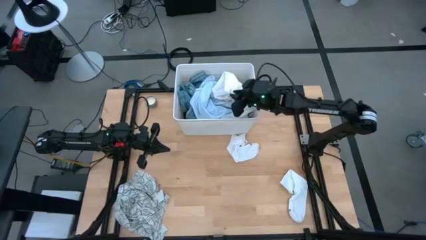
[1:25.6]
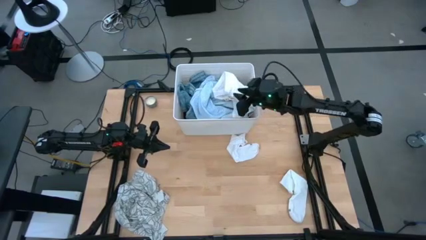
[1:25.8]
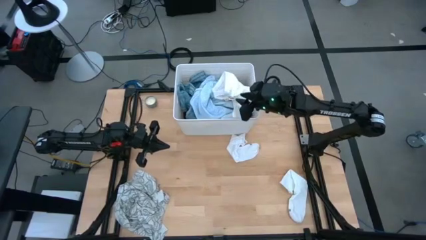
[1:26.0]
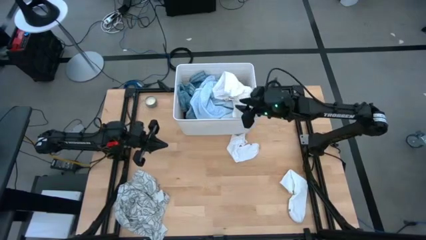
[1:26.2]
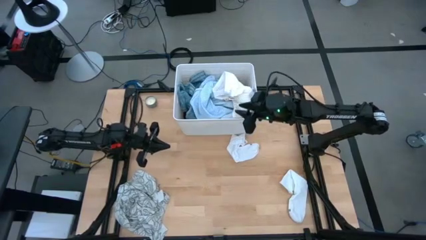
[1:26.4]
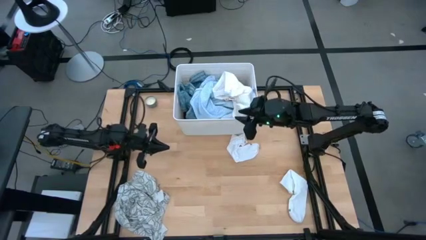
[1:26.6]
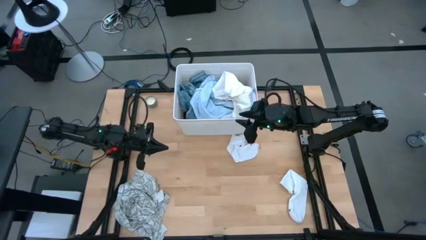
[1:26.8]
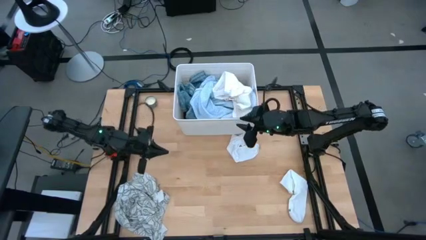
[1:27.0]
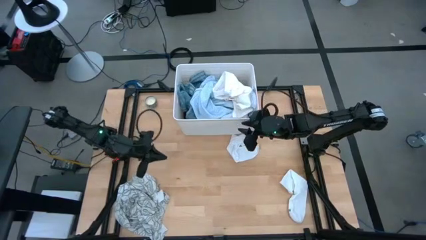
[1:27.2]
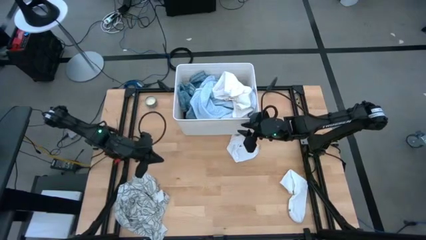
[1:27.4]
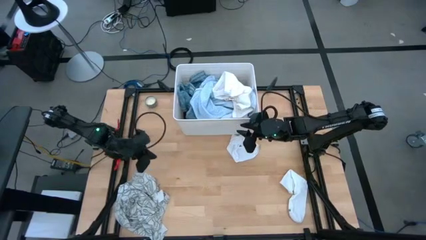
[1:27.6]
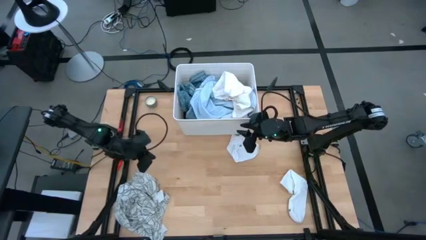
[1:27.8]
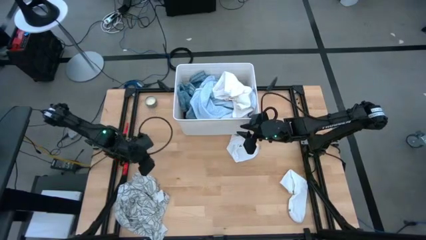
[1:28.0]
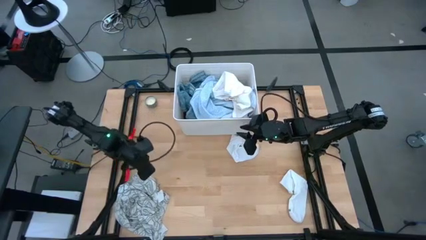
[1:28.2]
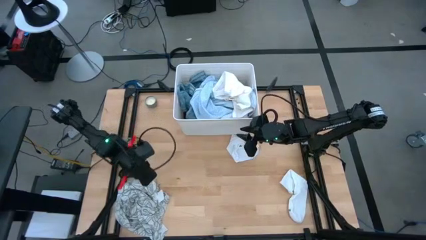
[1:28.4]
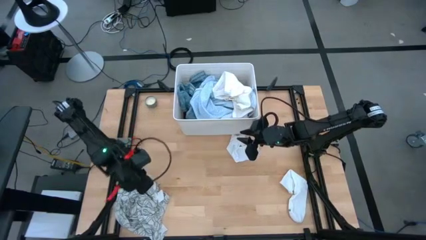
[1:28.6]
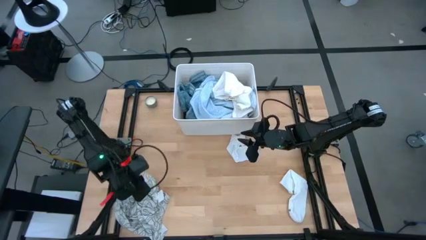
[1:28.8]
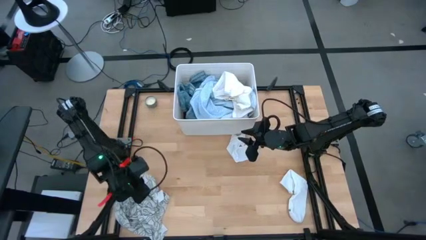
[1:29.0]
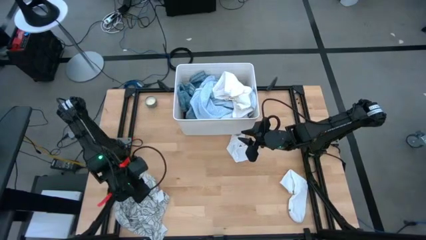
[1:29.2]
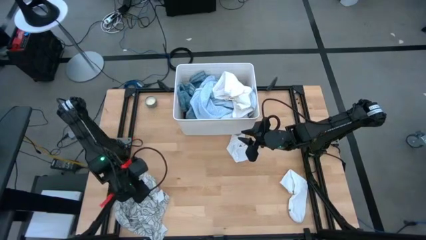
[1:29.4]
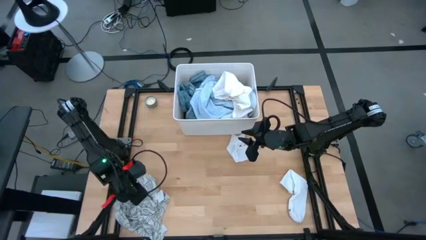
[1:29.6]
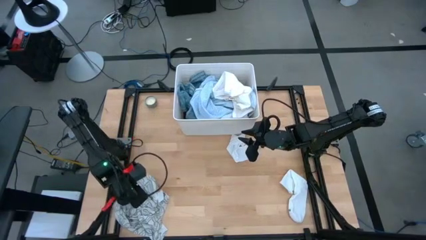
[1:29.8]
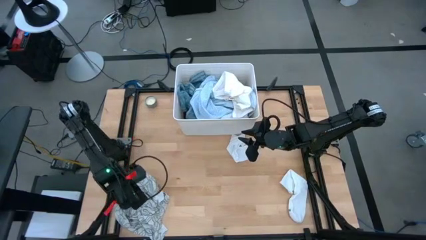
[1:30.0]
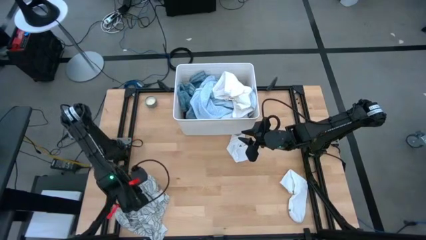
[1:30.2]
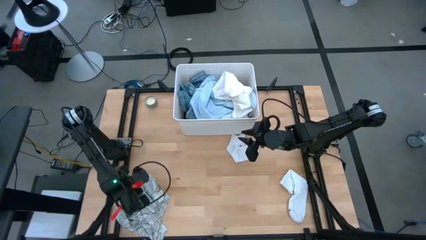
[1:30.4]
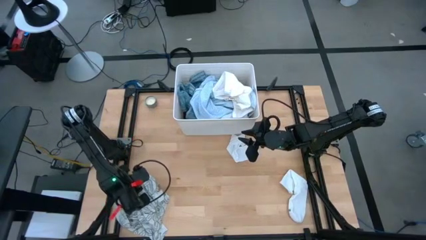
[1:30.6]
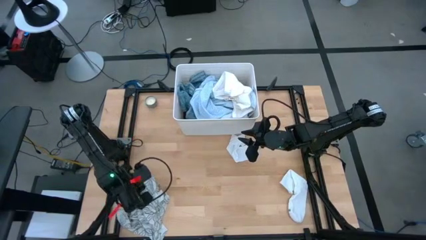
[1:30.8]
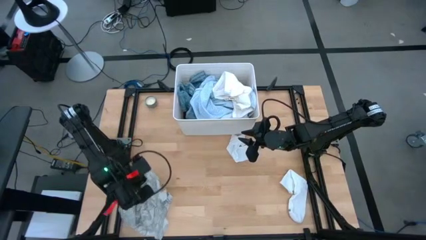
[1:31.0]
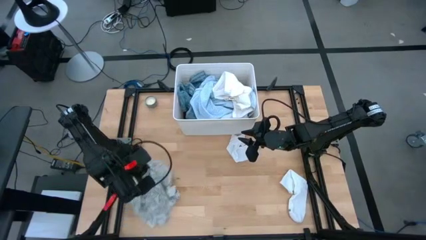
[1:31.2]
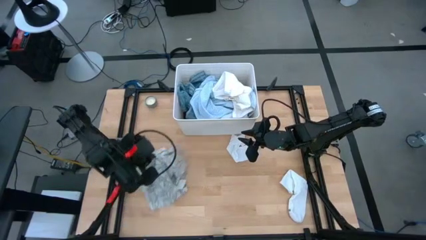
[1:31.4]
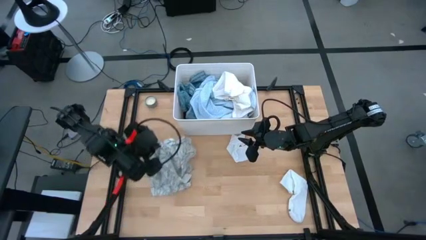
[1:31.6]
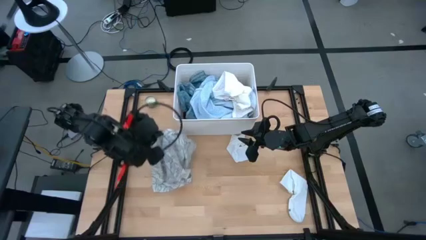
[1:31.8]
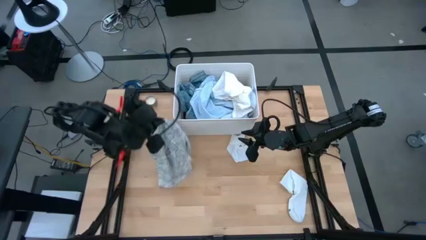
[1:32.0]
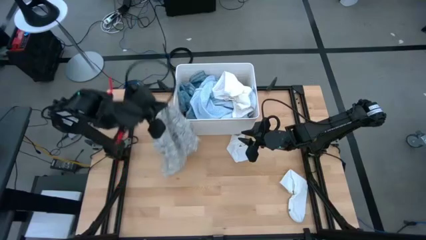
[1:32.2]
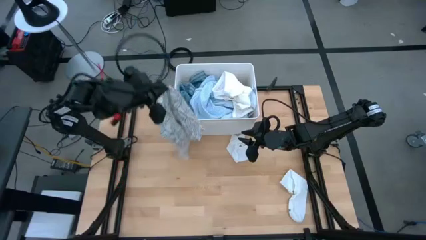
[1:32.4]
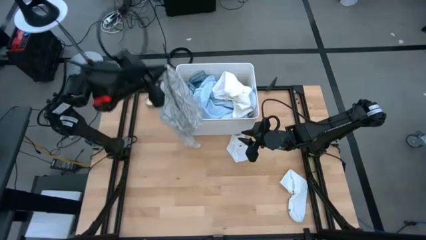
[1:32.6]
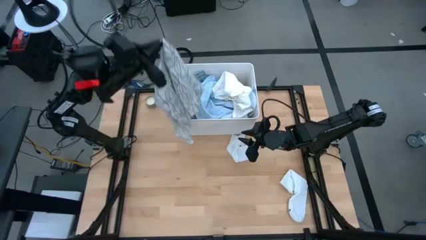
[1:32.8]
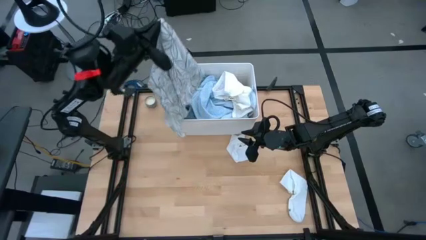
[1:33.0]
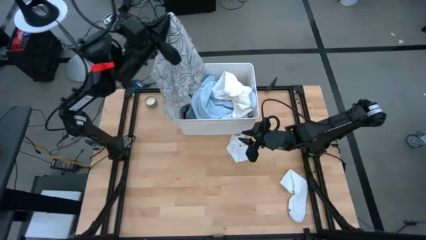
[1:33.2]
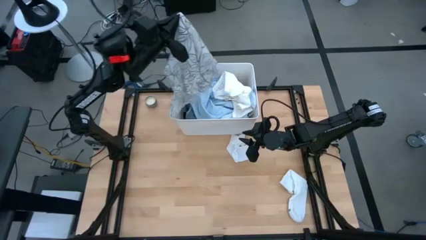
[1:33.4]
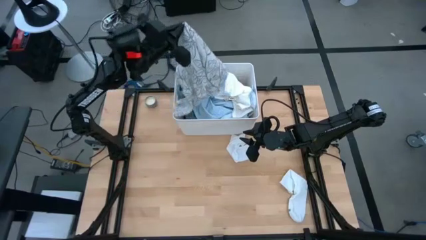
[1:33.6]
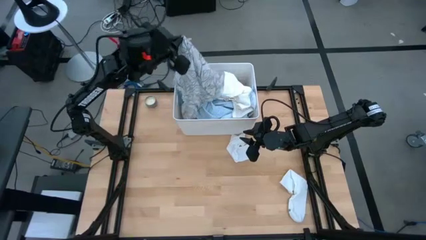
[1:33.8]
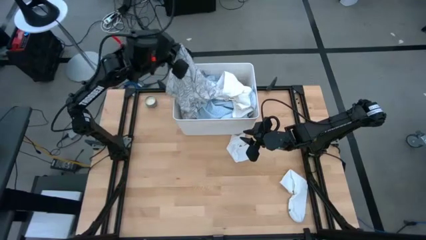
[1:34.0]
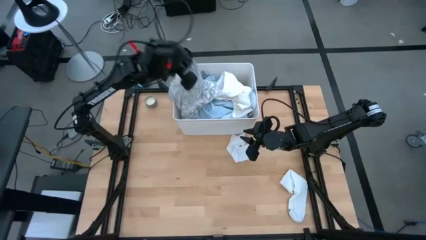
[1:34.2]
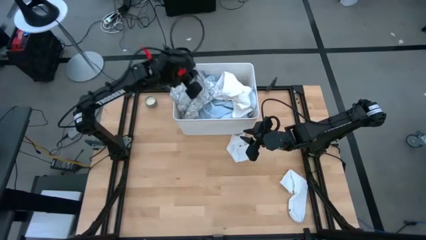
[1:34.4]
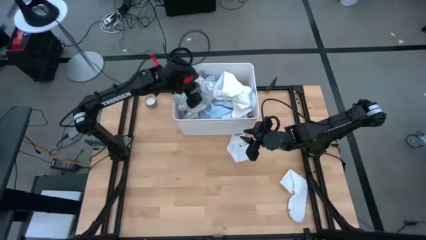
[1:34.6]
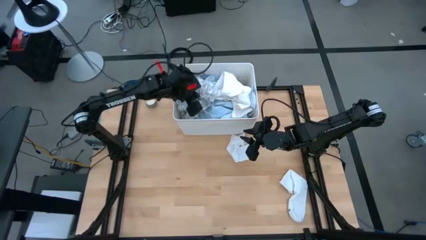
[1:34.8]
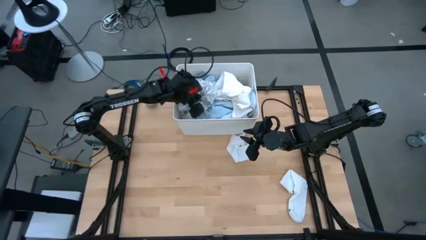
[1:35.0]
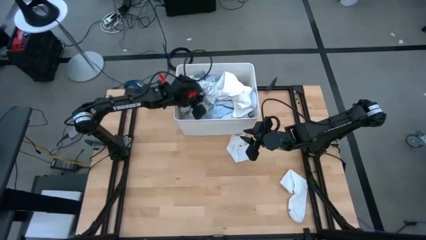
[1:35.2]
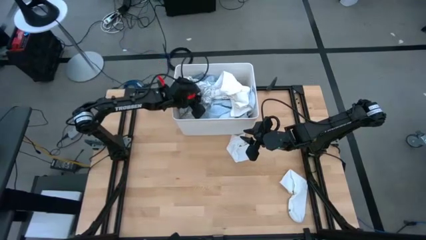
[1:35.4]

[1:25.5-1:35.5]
Task: Sort clothes
Put the white polo shirt into the laundry bin

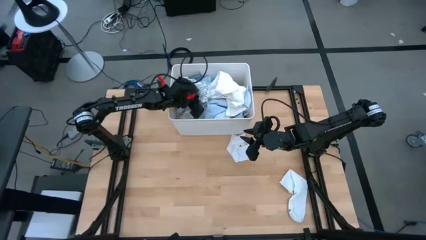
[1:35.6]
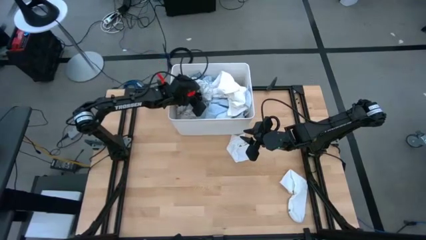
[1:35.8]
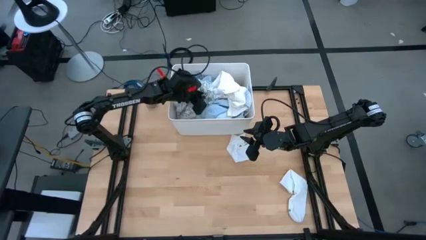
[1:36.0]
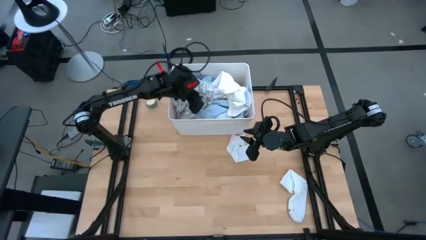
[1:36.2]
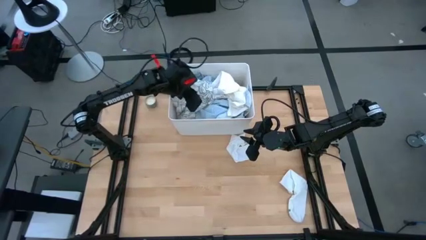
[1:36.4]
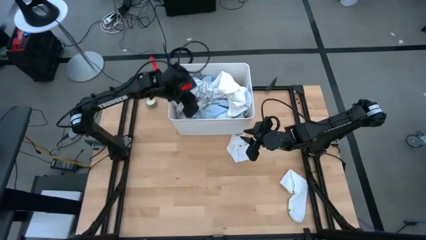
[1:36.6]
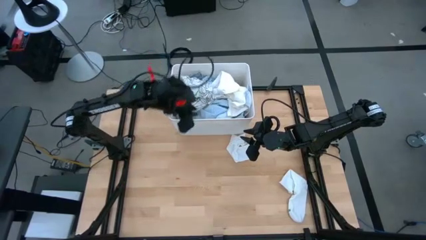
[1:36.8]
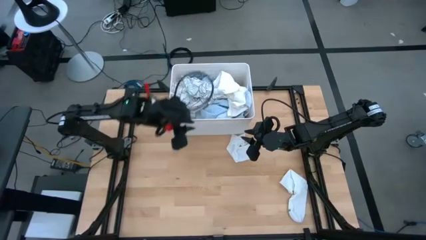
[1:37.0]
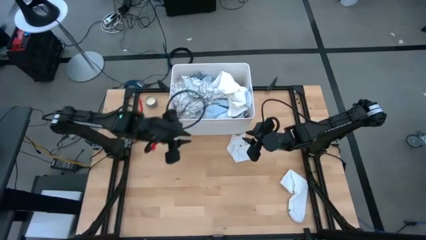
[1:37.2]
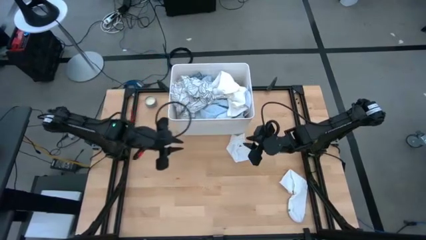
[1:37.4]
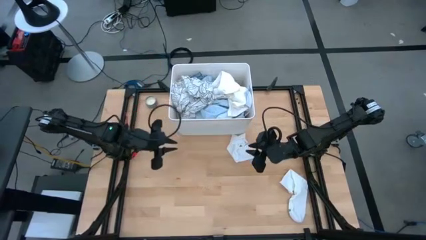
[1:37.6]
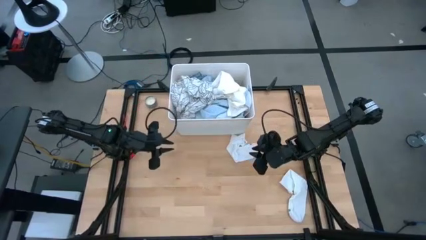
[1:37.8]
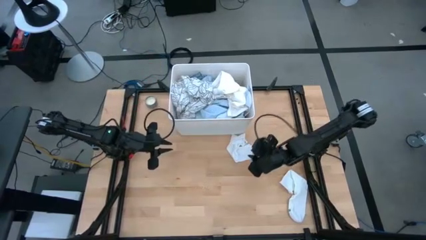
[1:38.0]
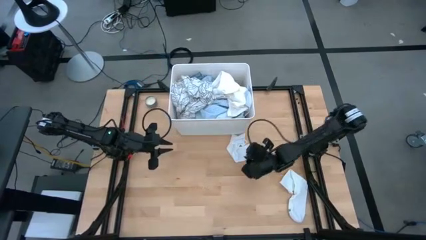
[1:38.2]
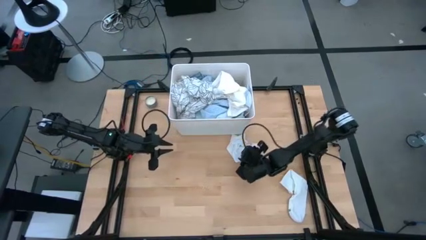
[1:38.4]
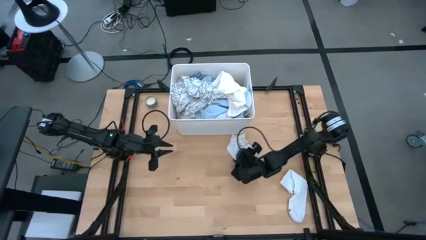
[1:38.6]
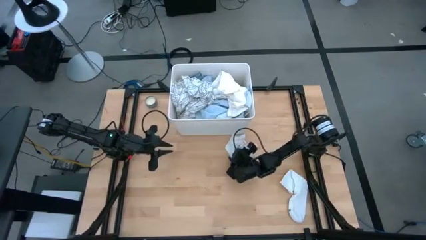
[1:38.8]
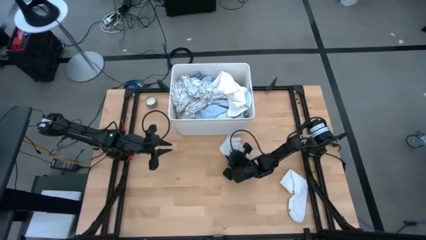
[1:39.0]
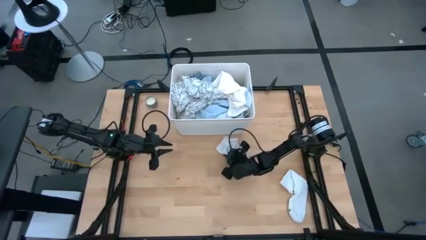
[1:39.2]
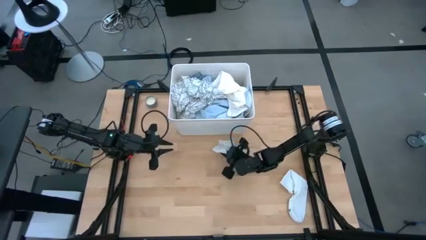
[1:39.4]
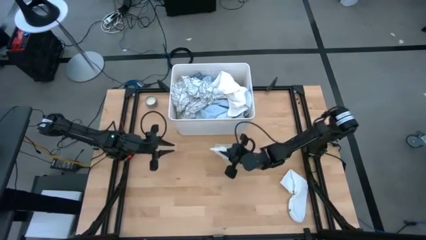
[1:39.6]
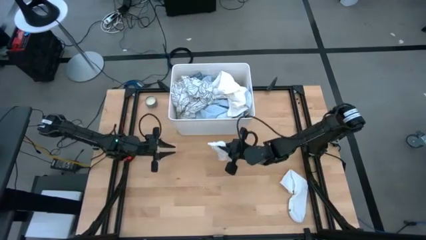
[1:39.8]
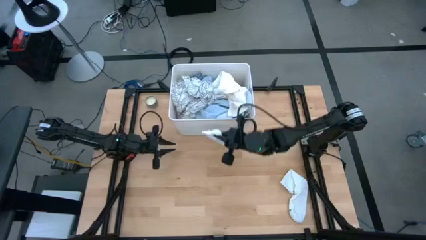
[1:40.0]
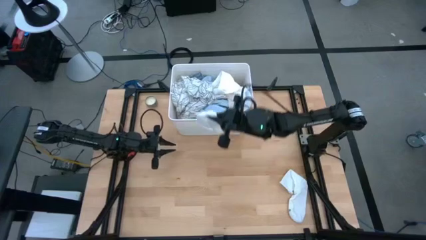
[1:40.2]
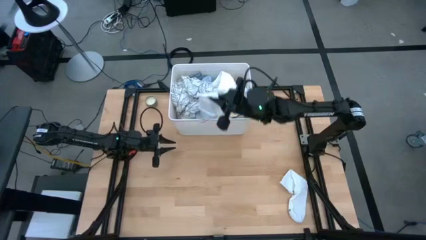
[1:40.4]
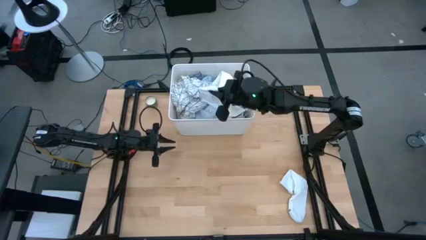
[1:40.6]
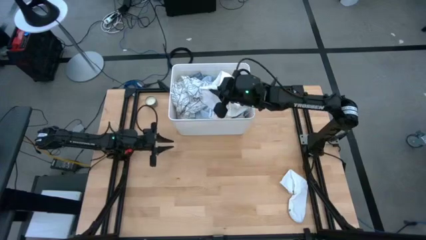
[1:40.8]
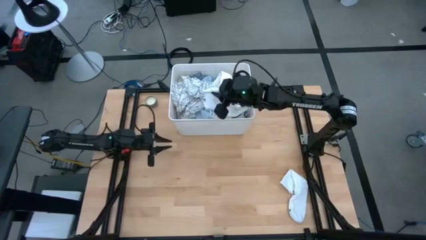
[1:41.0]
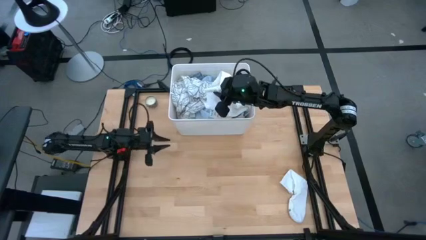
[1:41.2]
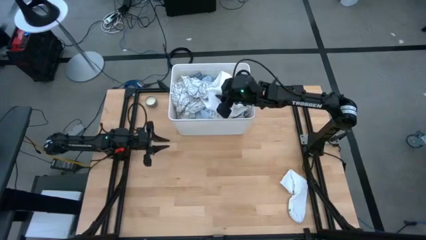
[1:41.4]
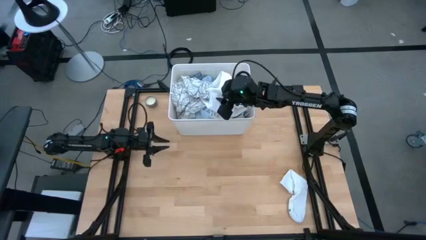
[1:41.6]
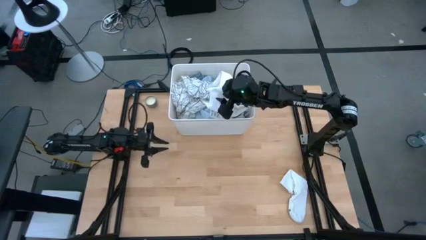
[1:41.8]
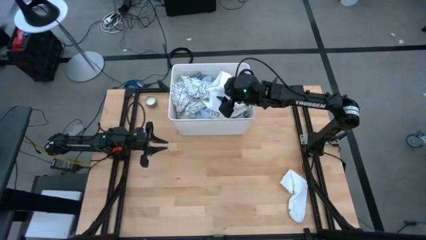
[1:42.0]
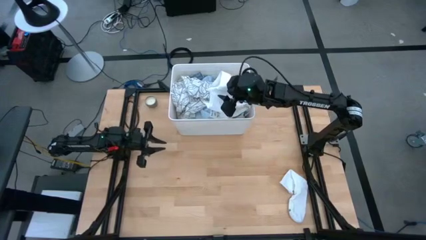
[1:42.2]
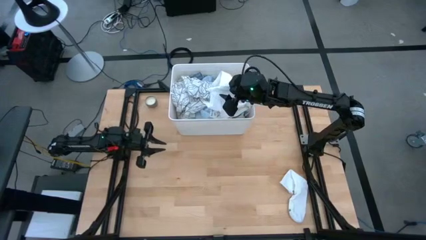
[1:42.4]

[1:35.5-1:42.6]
Put the top white sock into the laundry bin
